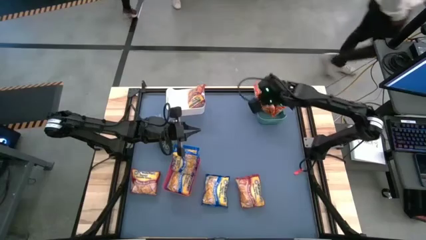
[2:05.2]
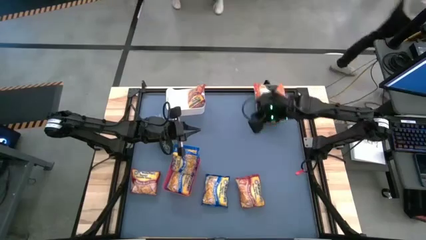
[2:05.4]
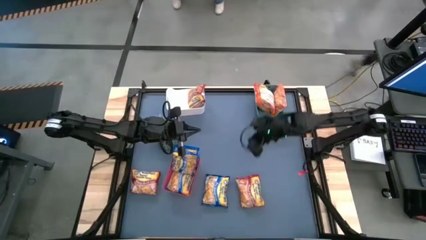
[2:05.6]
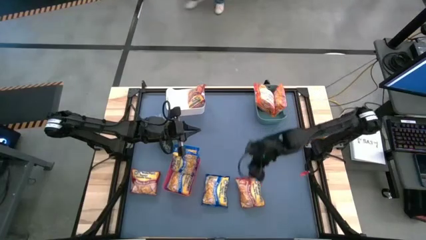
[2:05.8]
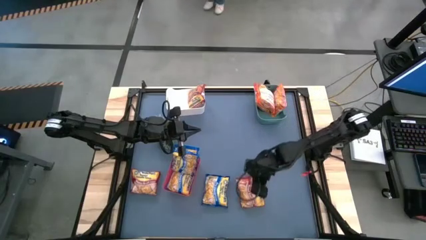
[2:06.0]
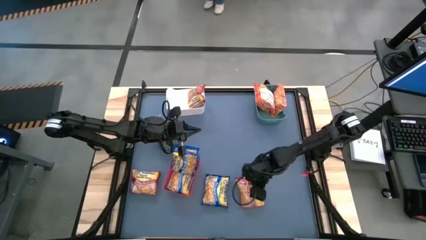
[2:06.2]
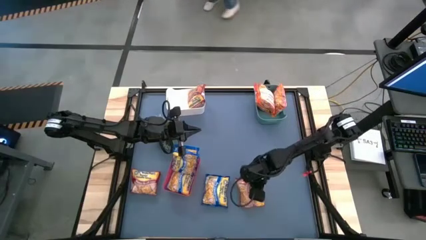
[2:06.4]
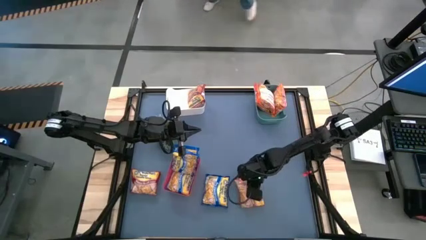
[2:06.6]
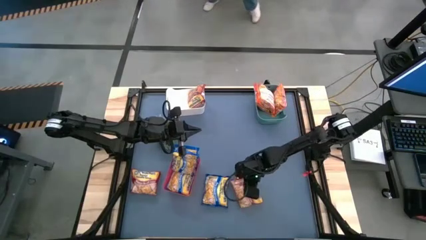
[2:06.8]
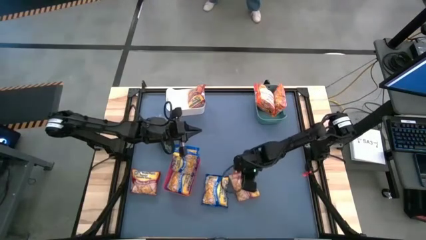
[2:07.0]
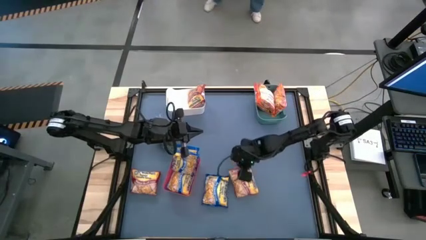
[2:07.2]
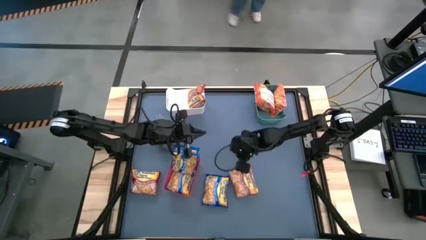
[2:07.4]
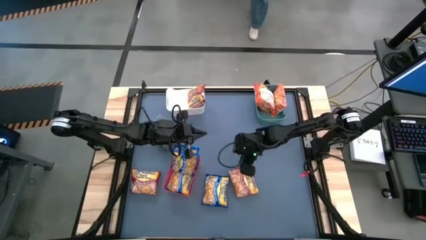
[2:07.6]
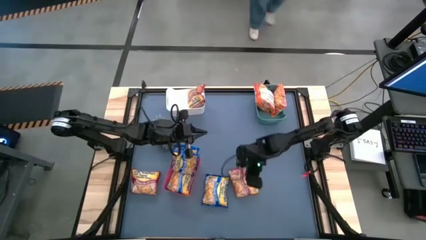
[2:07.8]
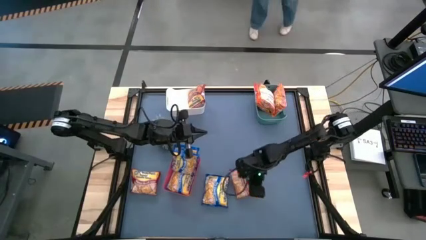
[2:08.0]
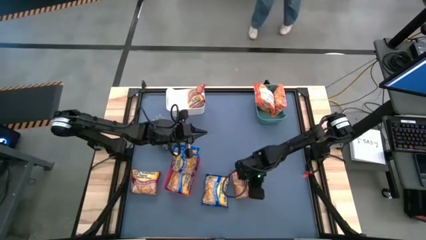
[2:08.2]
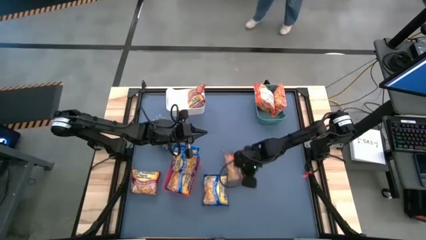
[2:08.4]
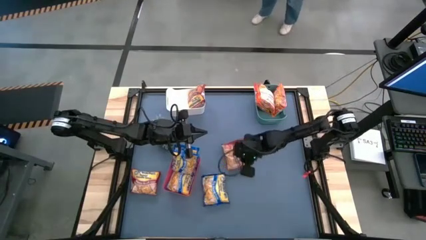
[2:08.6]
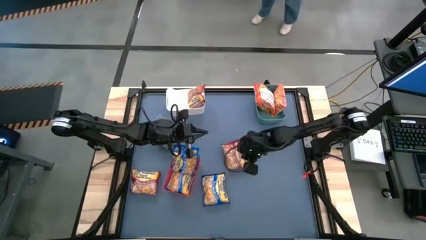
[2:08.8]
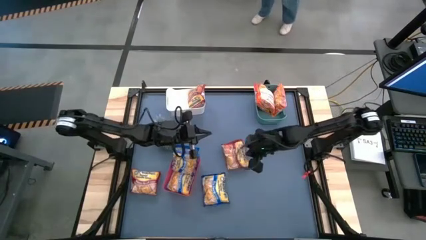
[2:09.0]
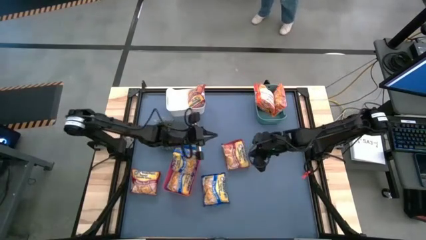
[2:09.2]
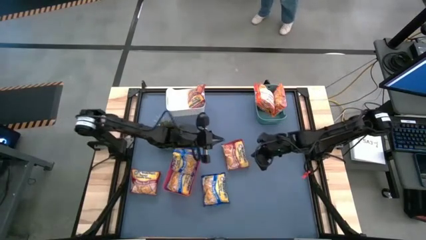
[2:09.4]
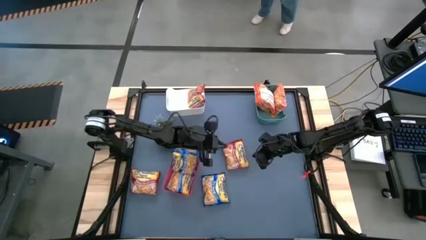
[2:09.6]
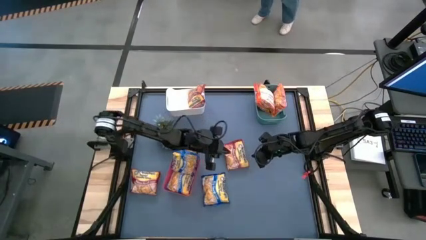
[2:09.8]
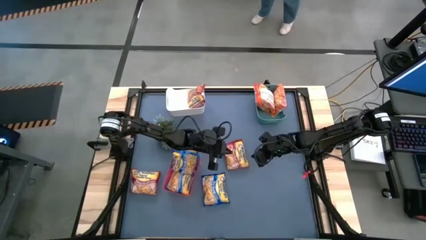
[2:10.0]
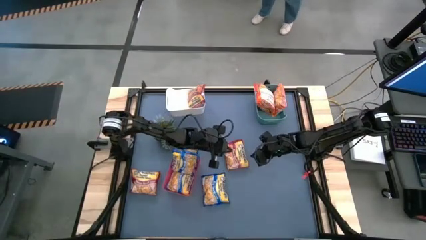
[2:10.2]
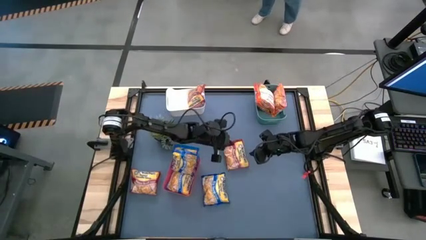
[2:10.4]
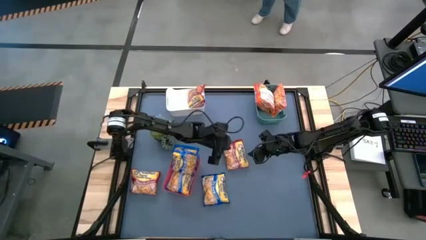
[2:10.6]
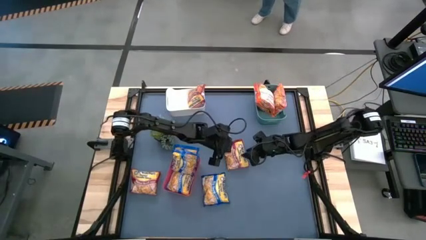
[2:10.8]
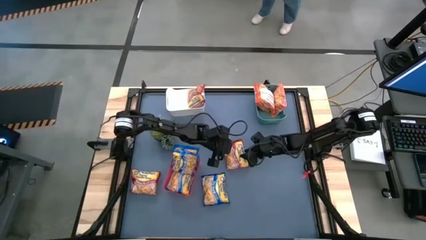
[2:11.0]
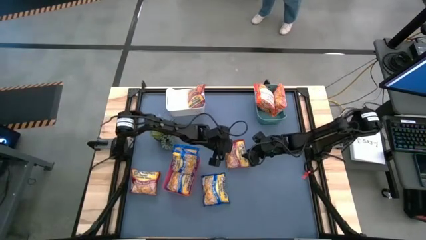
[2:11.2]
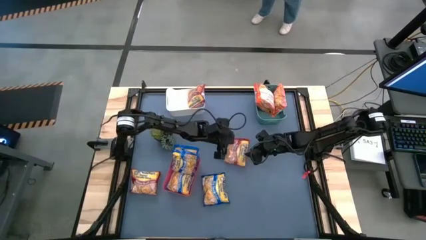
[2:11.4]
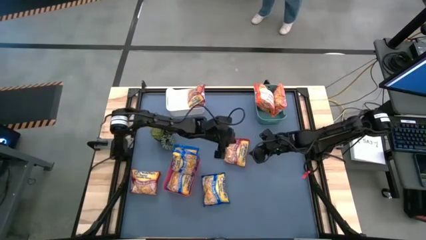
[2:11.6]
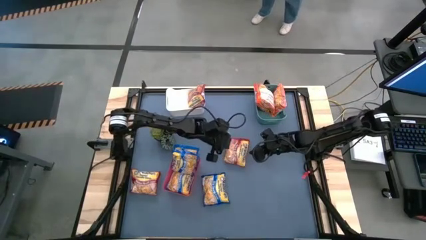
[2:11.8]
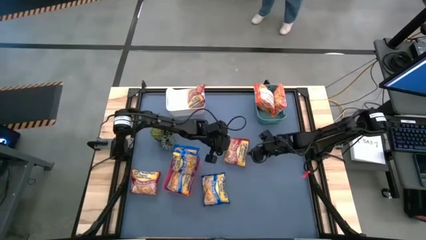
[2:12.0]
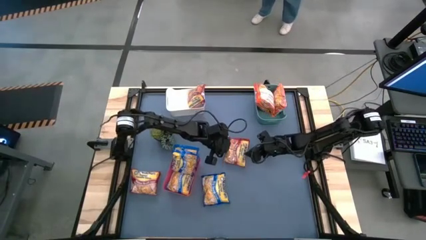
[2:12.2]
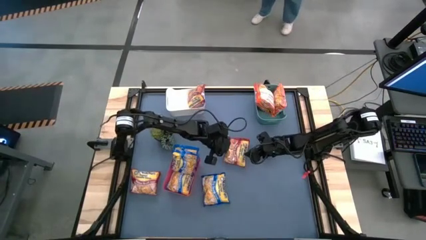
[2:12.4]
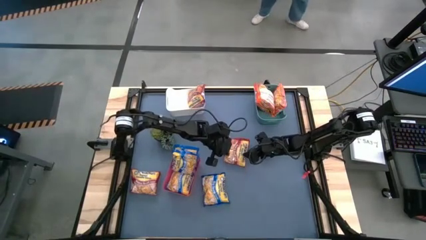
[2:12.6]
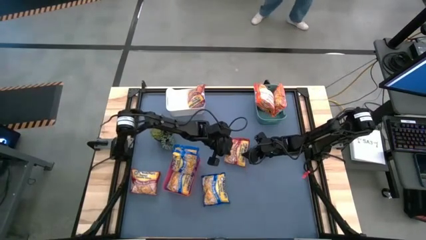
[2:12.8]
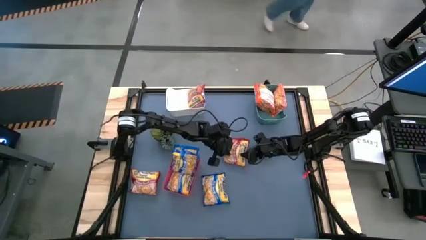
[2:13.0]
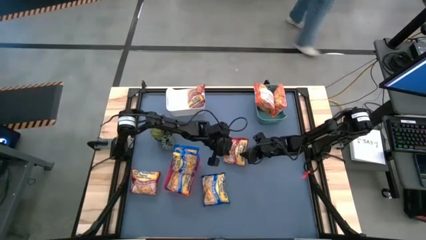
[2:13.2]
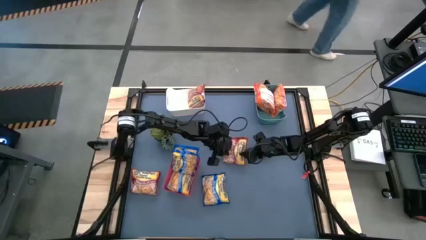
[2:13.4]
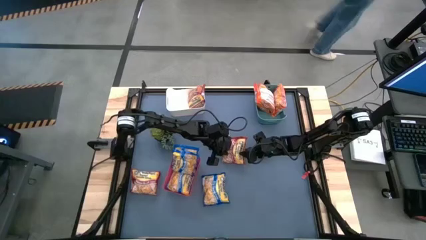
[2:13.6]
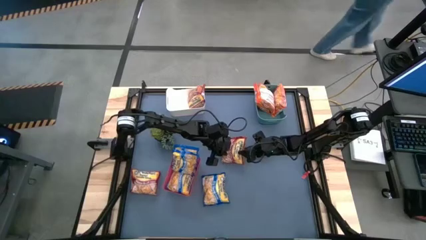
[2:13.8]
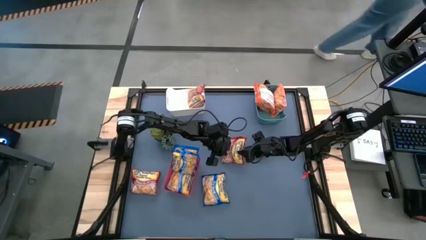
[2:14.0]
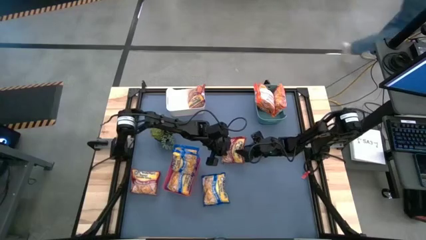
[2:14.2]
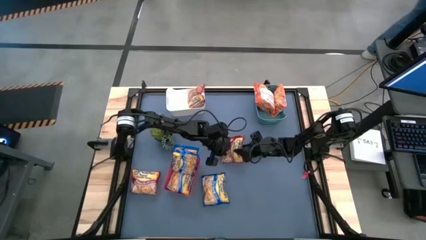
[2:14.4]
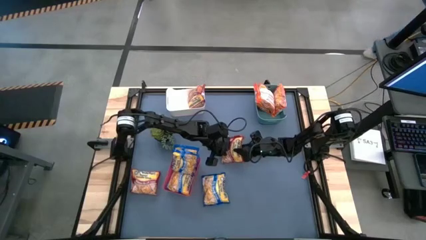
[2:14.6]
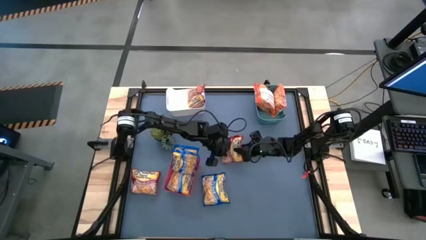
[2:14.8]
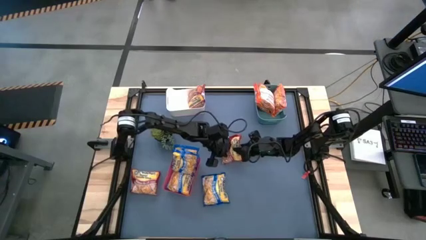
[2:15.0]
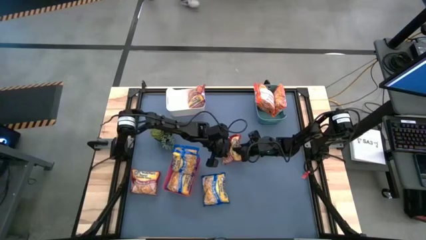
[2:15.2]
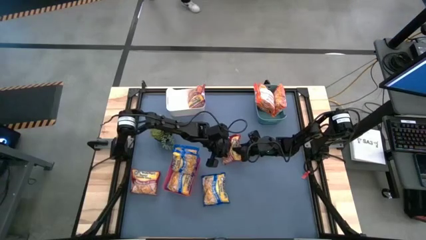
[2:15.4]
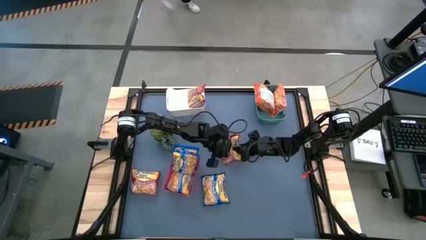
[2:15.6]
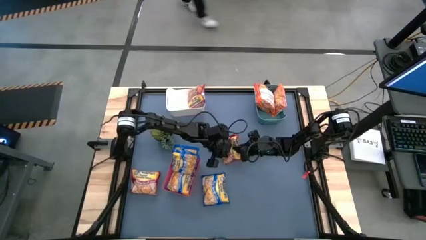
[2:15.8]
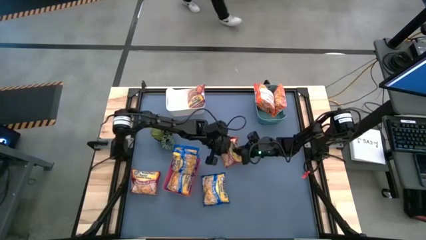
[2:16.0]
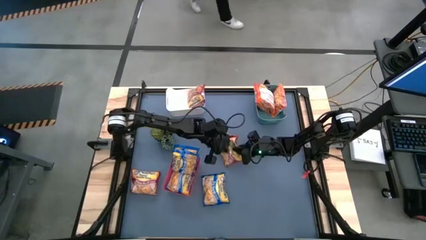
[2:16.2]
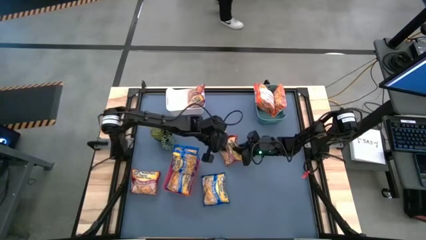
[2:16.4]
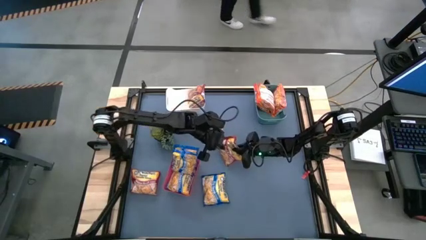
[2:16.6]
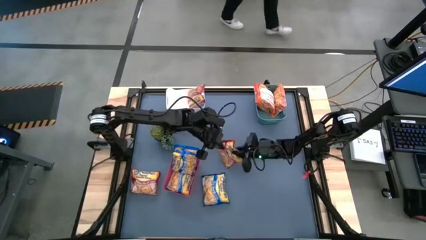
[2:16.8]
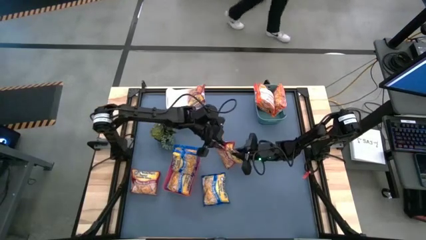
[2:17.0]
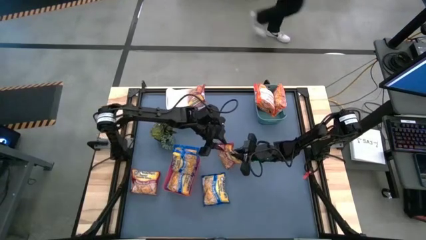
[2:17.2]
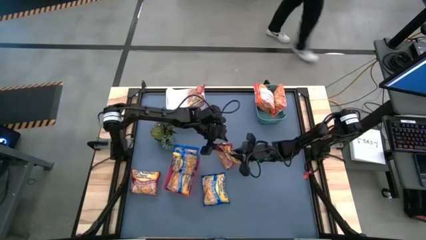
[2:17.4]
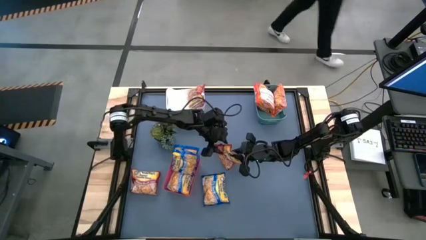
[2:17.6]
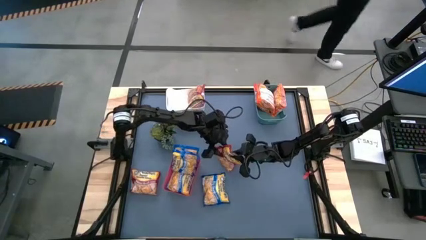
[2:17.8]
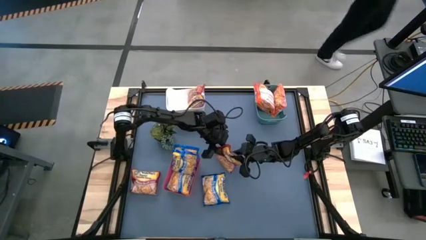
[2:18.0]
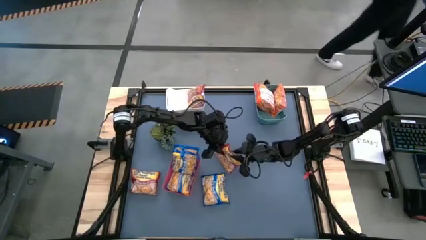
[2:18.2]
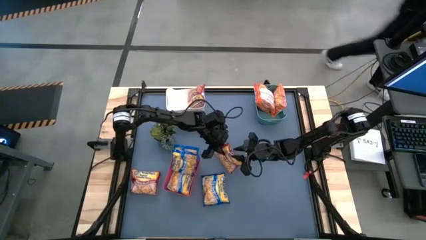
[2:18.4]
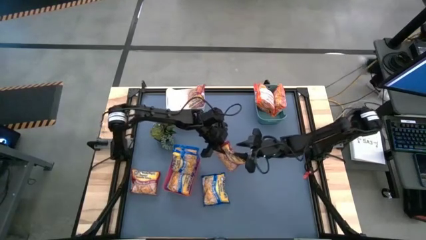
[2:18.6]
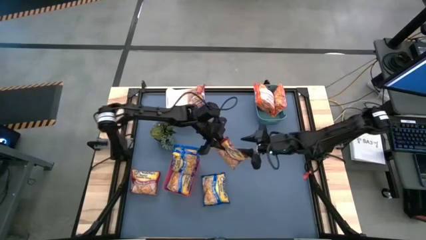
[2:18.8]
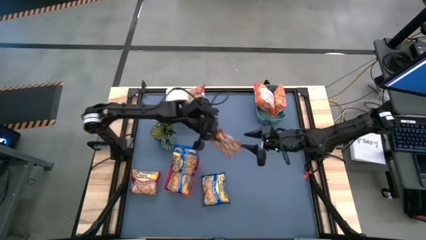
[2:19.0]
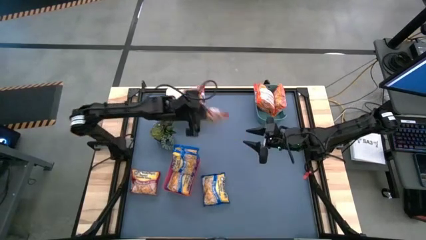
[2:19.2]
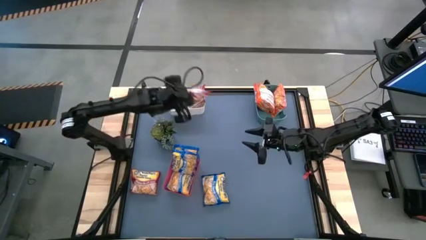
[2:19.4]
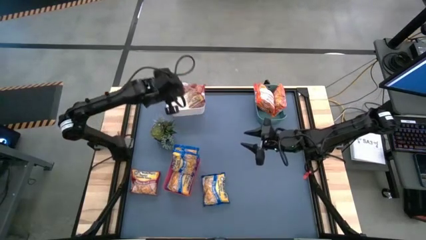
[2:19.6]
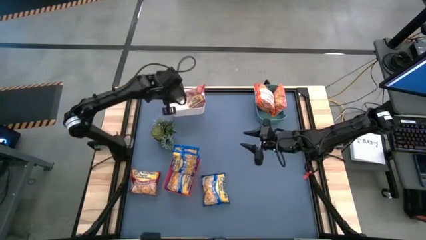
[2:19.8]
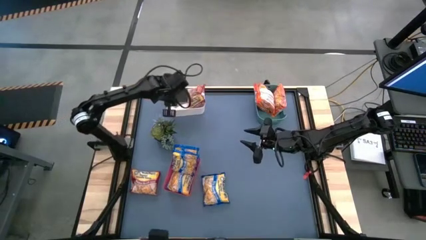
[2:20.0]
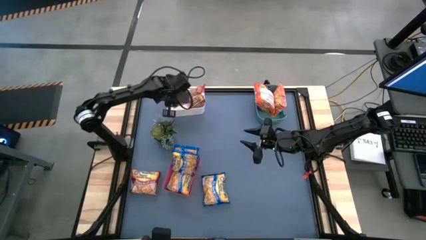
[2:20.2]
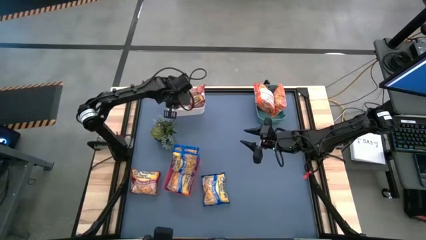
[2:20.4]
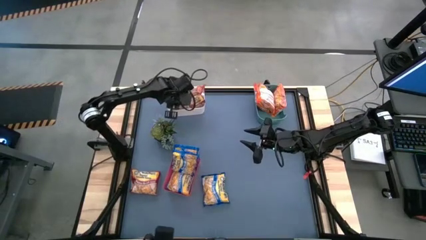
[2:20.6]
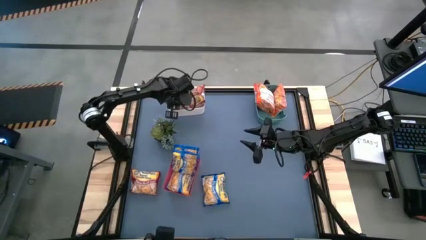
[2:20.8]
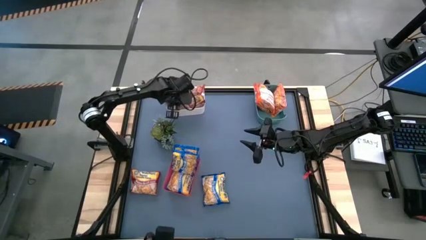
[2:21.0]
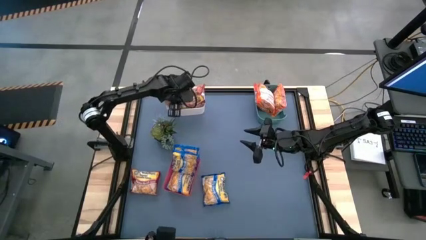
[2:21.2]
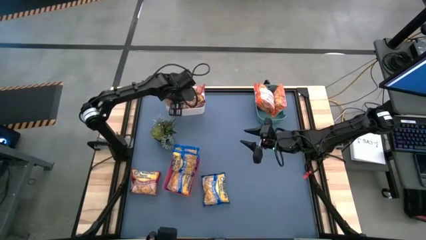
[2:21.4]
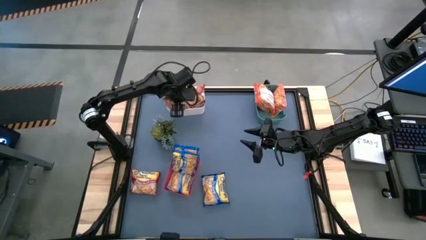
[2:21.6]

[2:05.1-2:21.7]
Task: Sort Maruchan noodles
Put the right red noodle pack into the white bin
